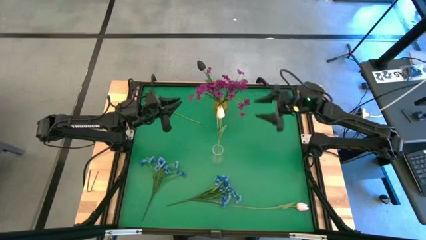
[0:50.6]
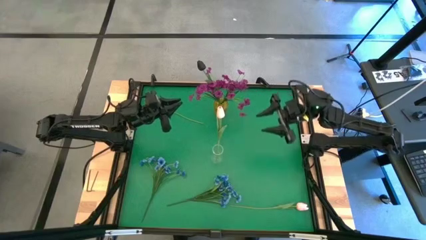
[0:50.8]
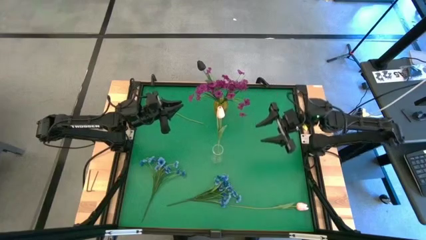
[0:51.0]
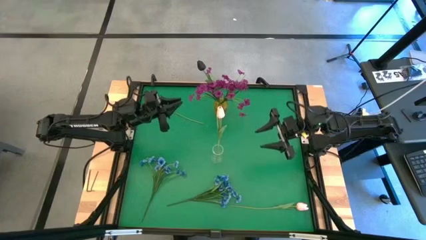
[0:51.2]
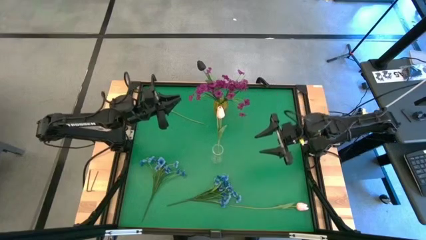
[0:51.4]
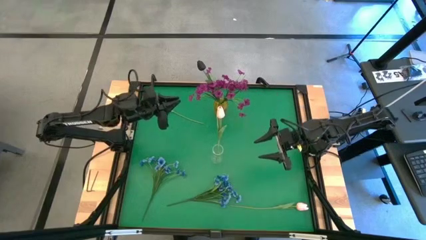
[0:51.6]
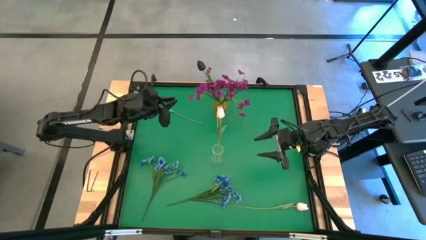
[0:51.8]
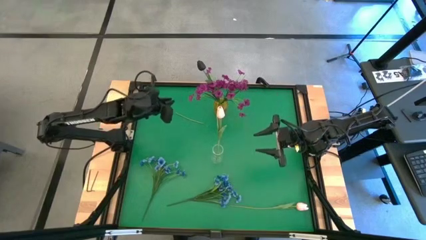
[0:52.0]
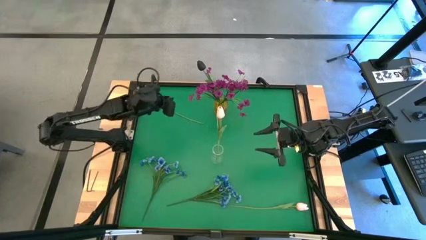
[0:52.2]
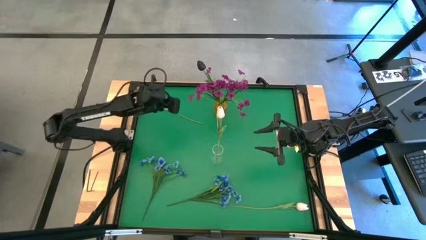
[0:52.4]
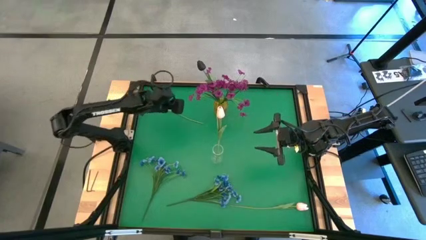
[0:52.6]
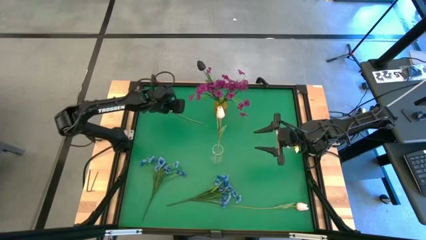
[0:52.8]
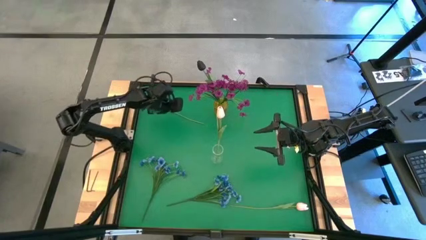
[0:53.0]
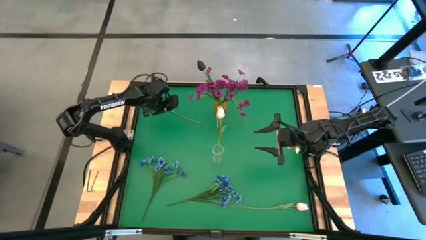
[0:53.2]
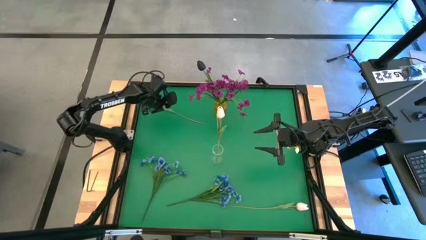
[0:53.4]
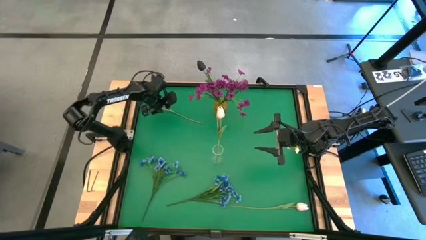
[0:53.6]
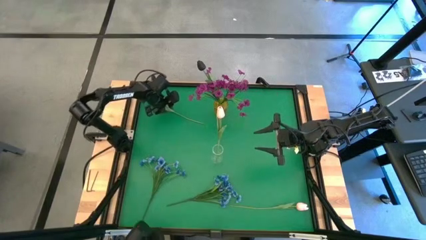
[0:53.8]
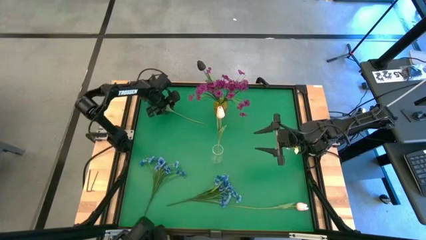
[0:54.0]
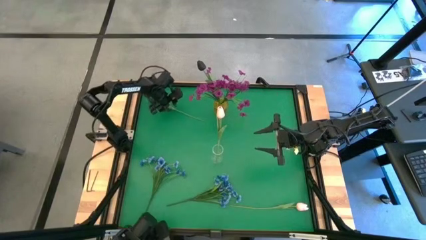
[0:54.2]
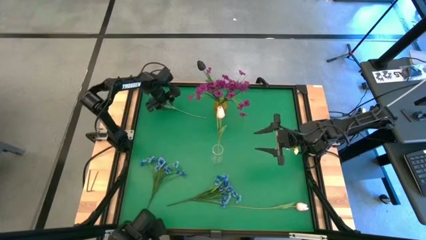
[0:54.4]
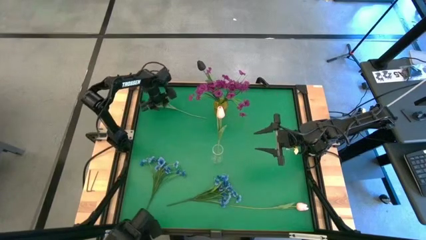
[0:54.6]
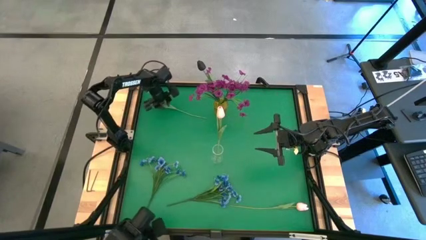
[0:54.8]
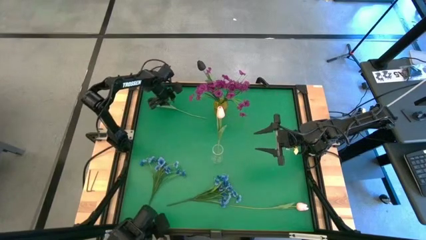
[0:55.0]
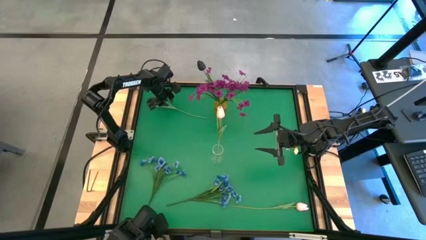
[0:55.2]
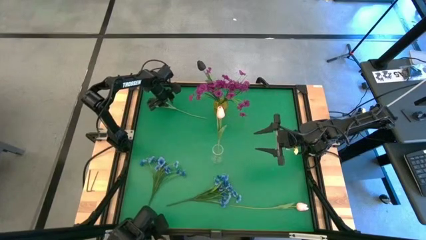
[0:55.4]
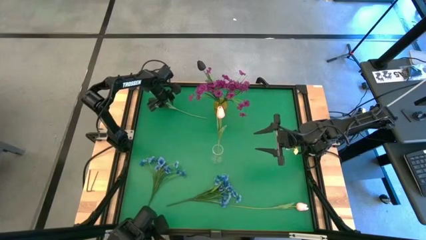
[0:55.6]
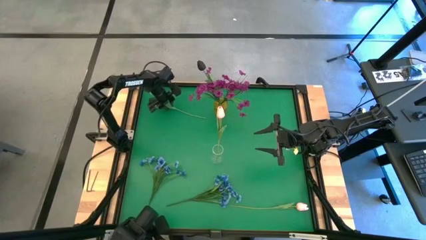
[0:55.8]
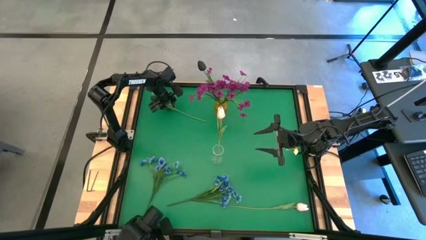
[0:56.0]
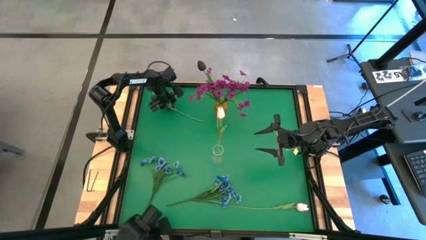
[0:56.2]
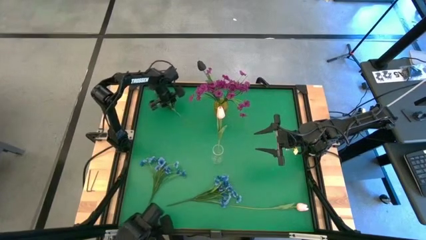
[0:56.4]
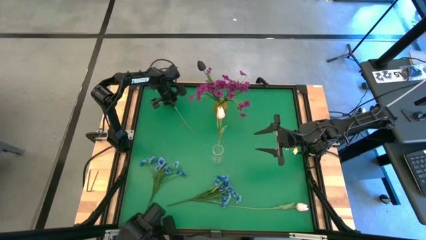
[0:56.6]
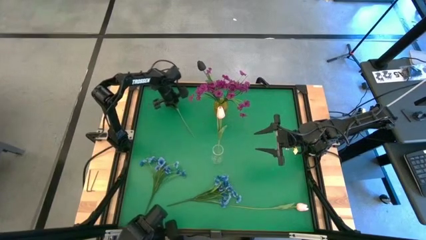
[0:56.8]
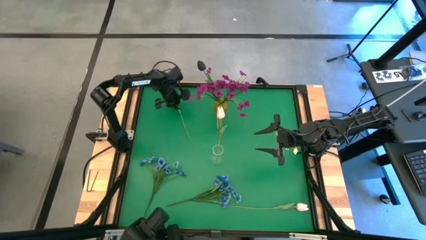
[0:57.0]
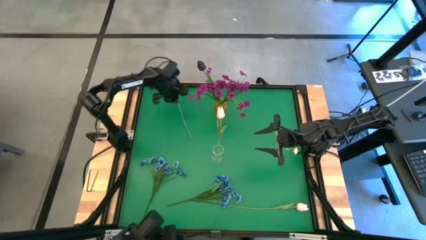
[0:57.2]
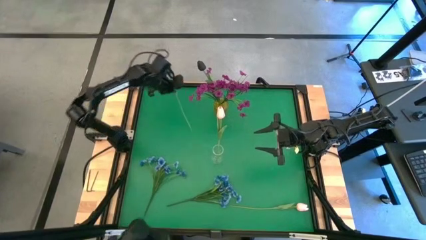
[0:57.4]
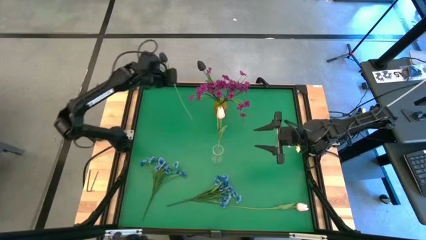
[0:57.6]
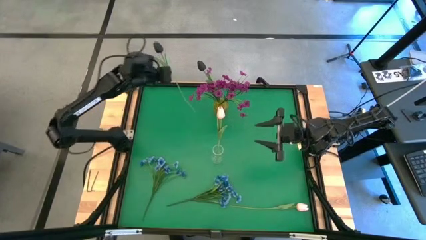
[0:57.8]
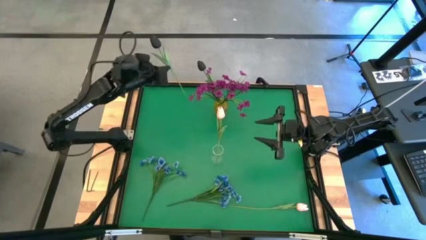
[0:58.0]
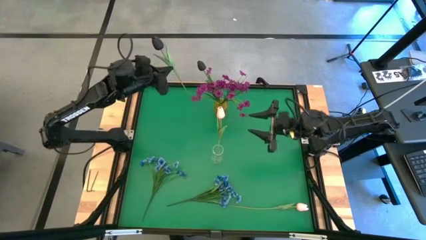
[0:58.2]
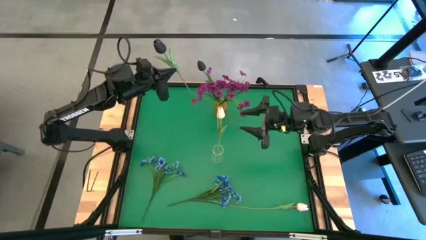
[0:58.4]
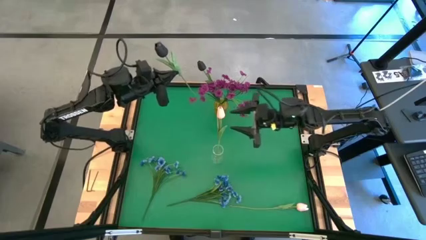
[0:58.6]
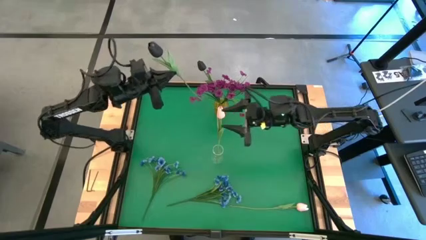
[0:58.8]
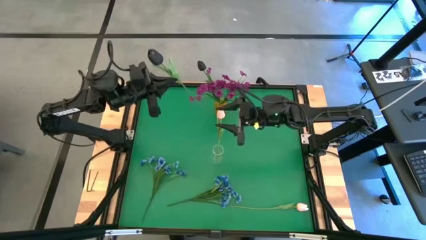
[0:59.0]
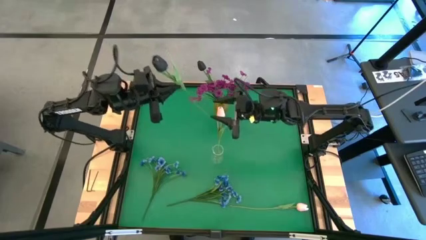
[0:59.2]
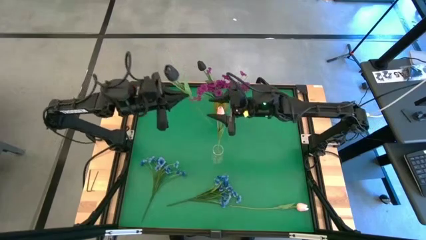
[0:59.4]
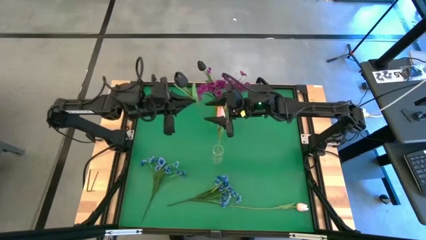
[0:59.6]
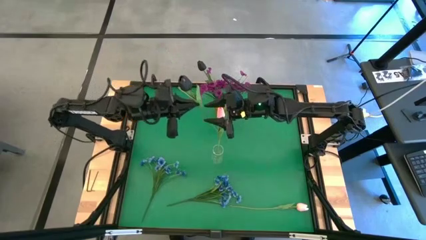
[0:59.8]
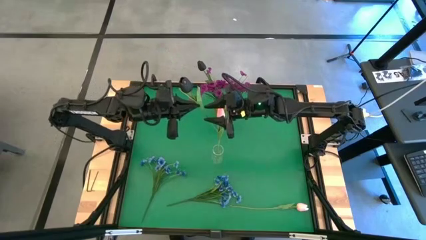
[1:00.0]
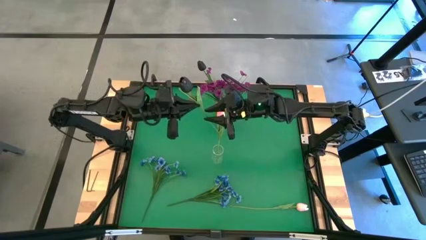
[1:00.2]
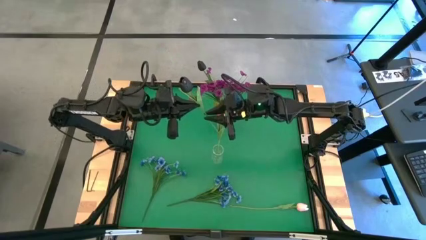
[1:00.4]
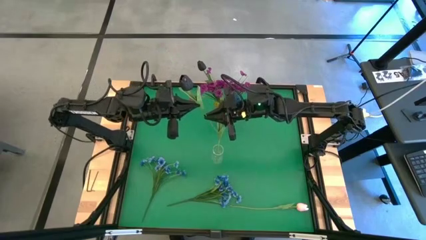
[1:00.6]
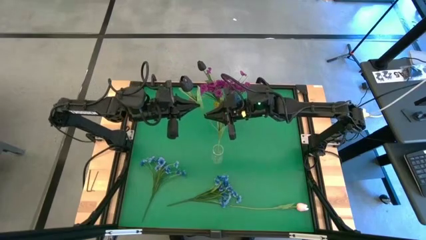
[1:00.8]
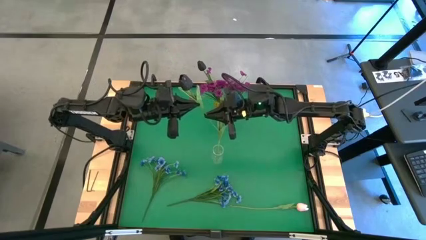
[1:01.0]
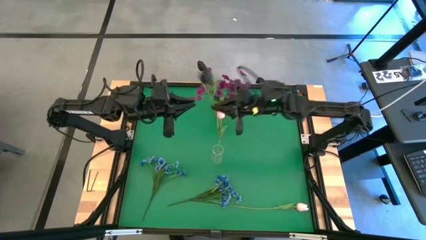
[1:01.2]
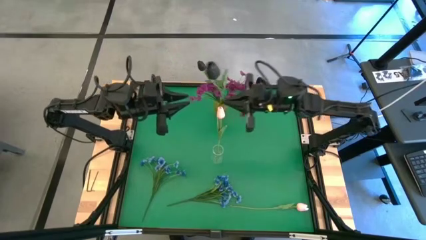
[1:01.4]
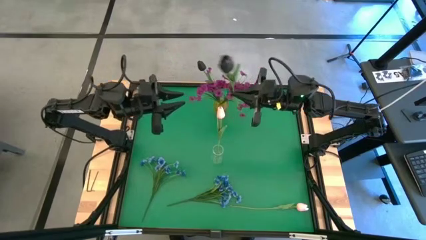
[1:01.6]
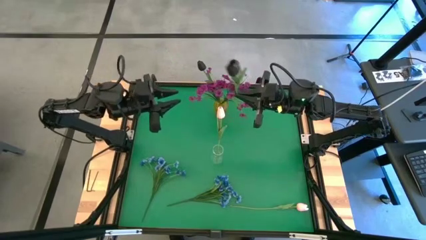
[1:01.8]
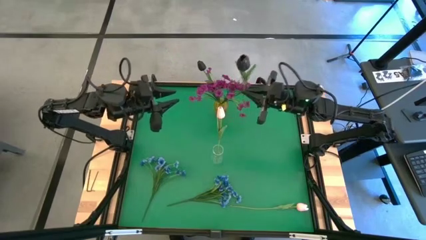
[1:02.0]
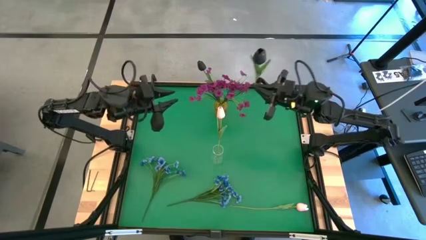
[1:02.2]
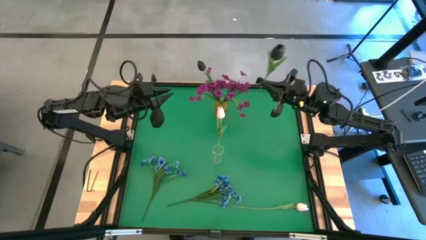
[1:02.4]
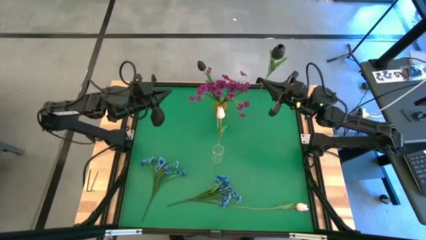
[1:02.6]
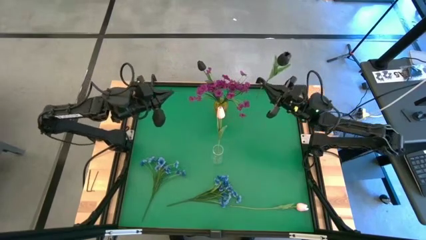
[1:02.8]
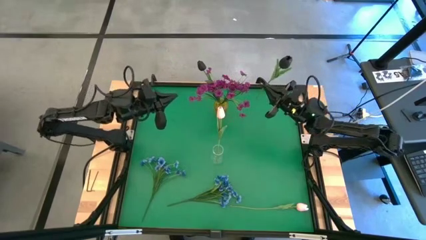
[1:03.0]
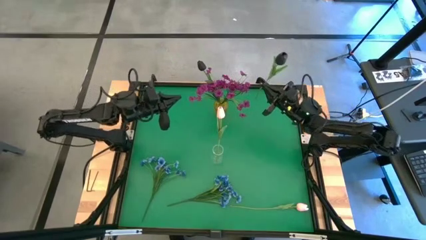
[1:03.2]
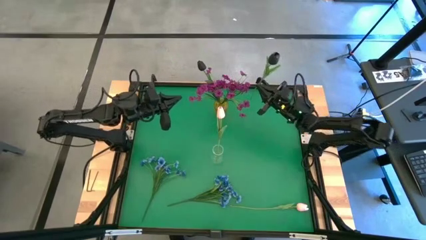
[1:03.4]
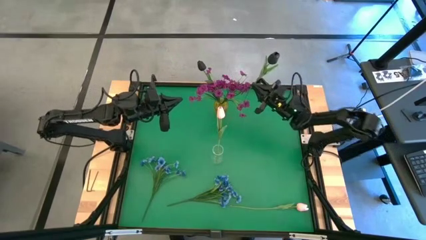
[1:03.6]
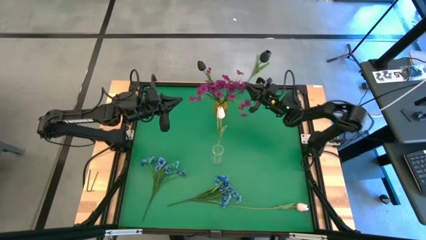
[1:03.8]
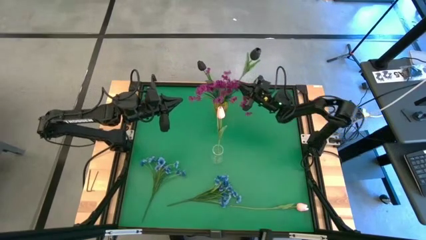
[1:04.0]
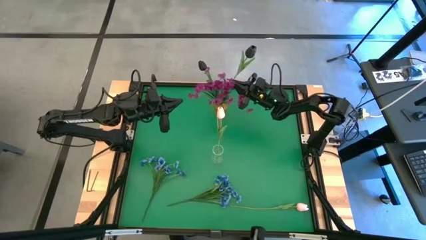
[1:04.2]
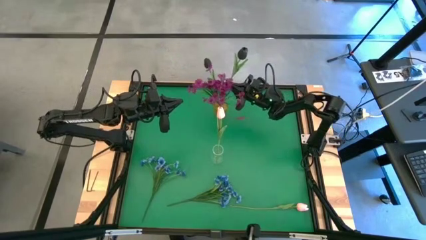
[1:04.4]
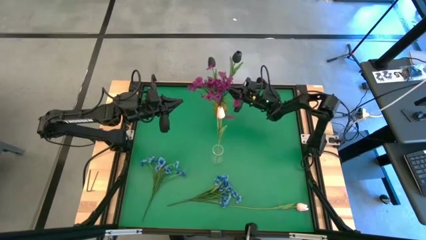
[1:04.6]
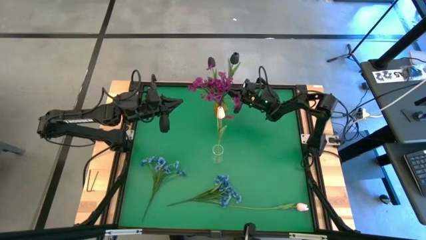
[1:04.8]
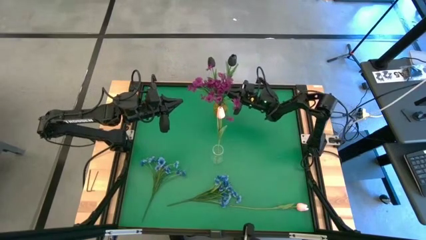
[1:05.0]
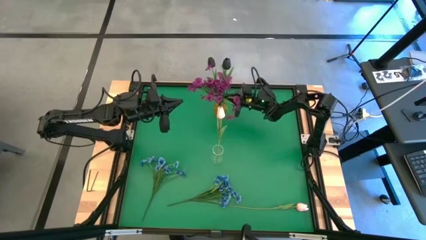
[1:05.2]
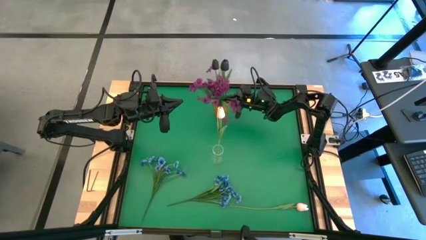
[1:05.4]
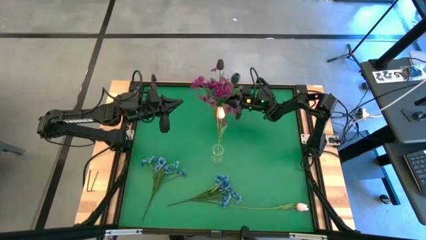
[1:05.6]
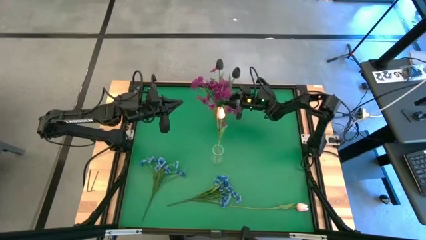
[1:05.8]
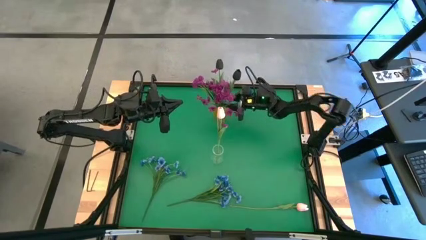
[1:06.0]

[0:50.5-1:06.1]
Task: Sort flowers into vase by color
Put the black flower into the yellow vase

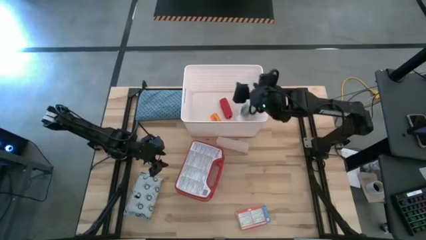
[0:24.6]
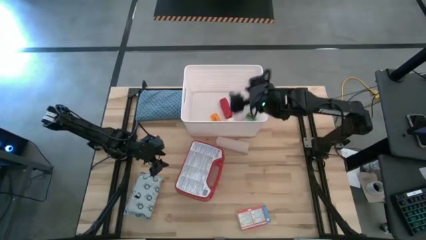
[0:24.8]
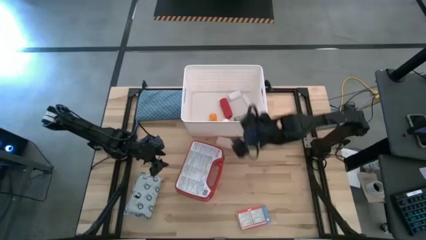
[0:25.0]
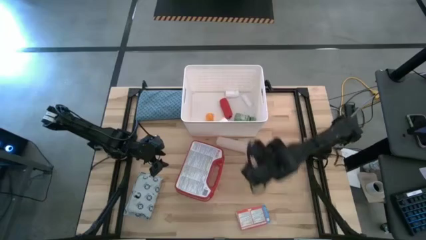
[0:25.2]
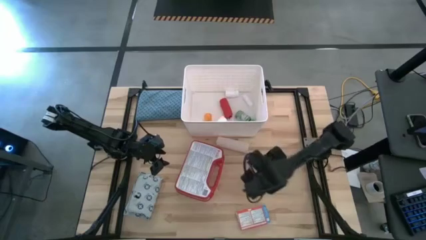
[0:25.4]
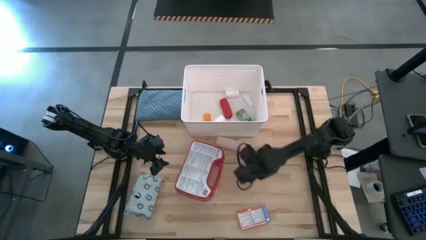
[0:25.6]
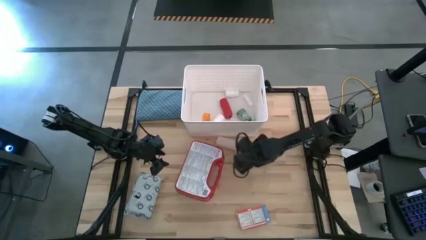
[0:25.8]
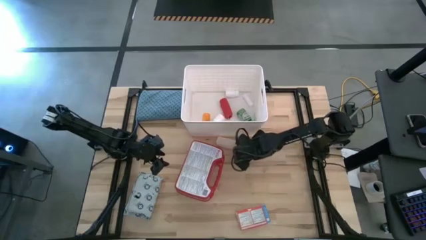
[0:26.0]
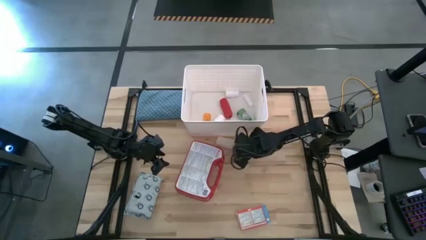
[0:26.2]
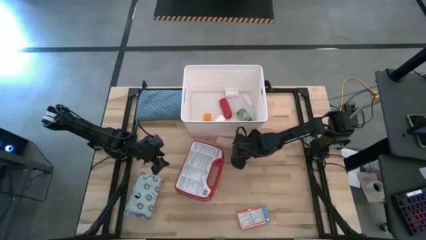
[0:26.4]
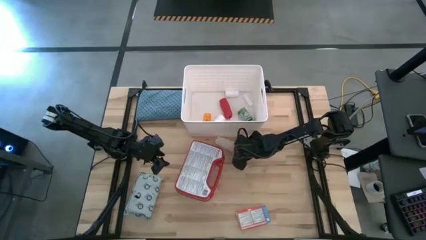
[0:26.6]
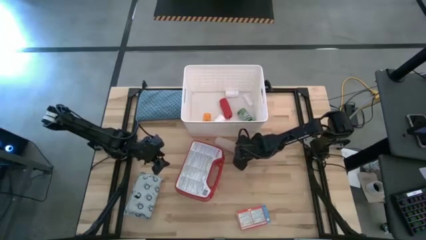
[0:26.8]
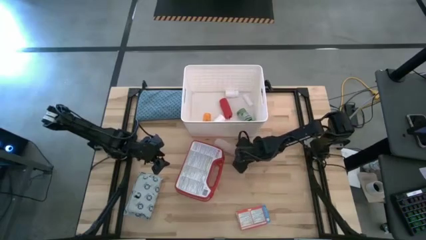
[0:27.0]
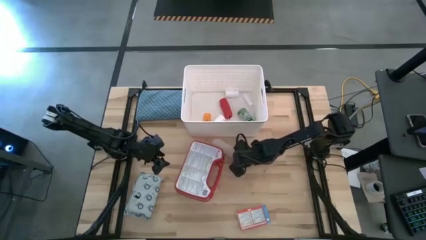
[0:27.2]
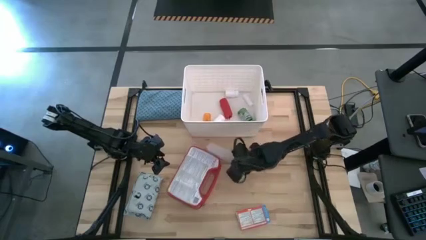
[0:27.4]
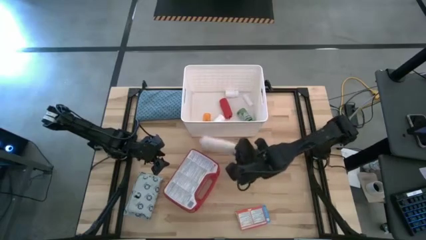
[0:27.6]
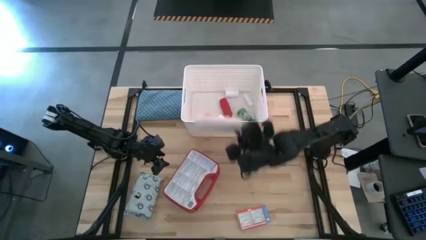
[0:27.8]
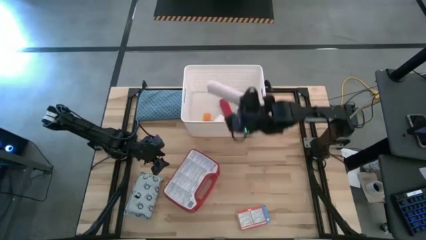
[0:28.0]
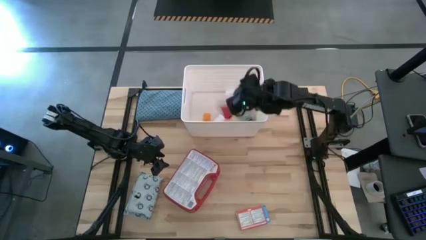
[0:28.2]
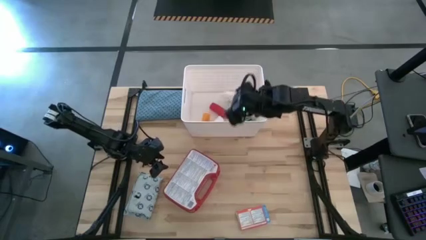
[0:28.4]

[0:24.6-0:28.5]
Task: Pick & place medical supplies in basket/bin
Put the white big bandage into the white bin
